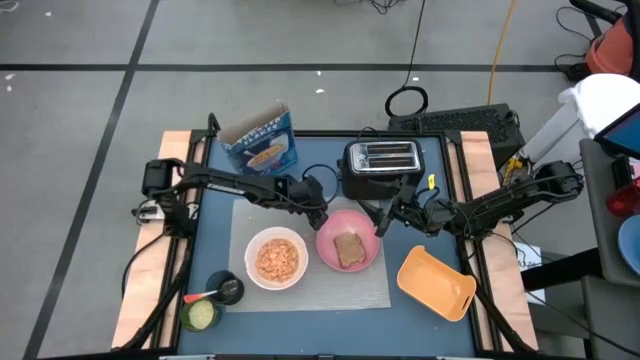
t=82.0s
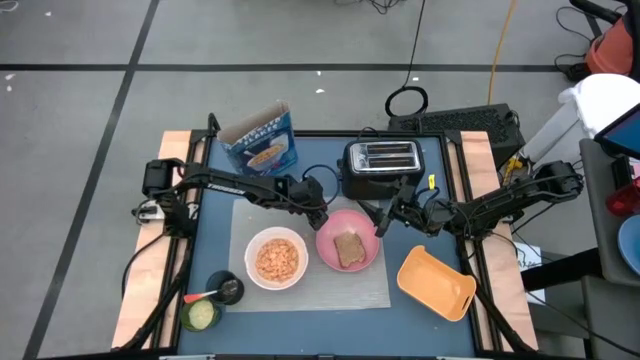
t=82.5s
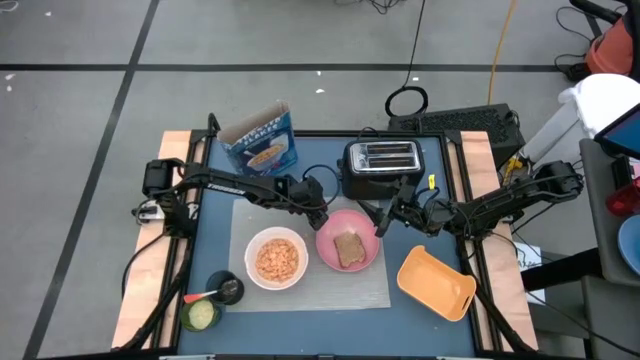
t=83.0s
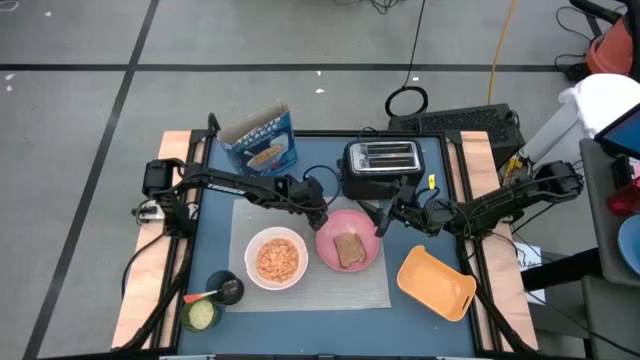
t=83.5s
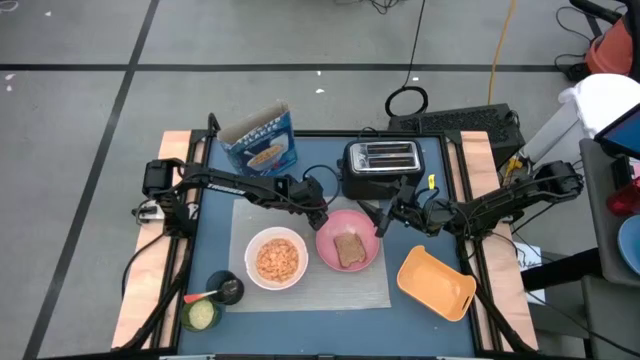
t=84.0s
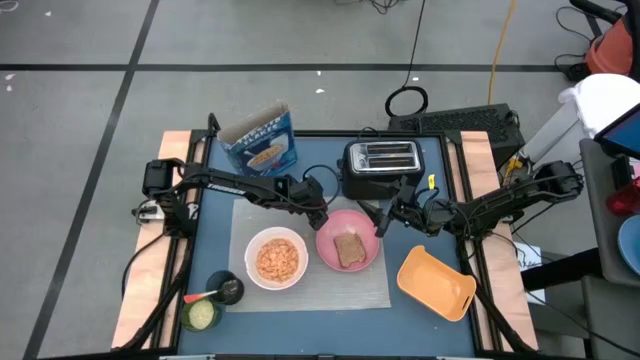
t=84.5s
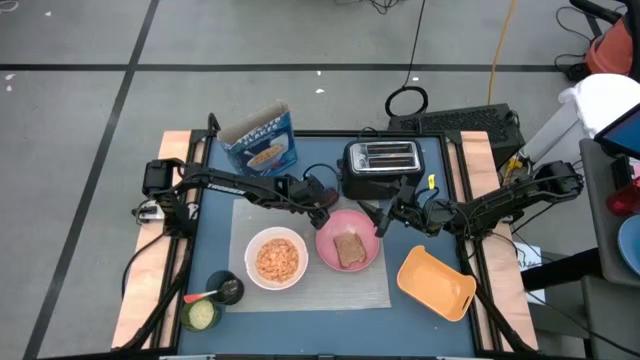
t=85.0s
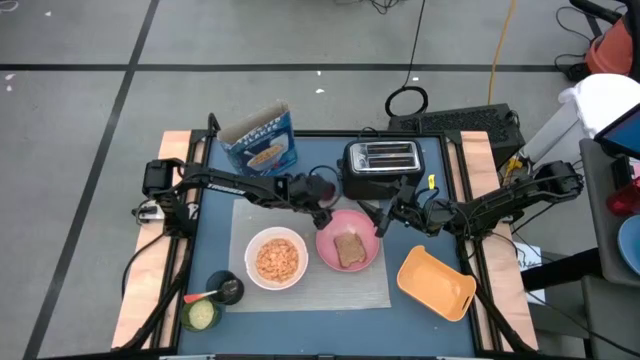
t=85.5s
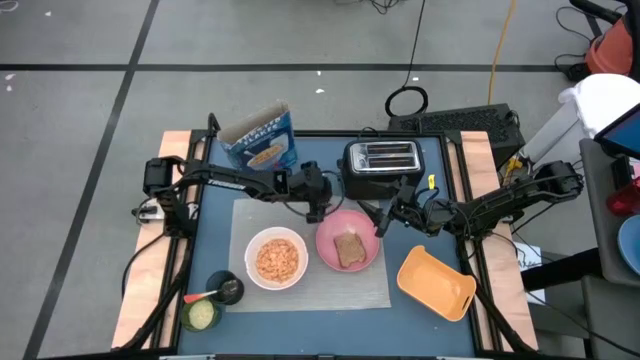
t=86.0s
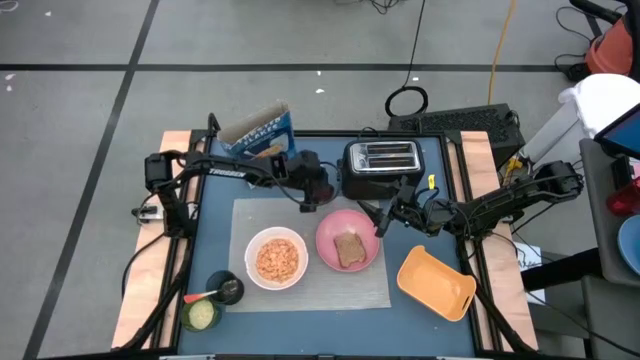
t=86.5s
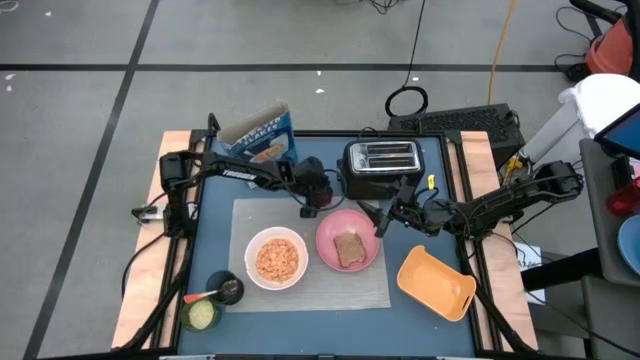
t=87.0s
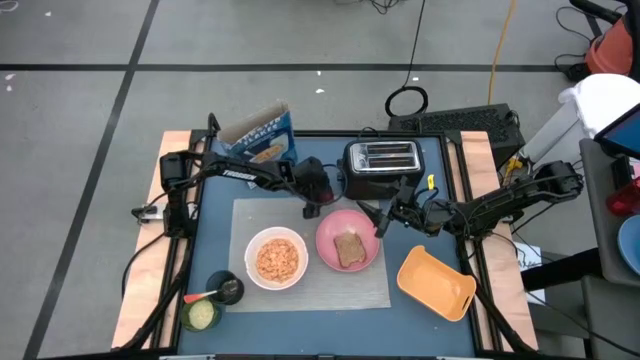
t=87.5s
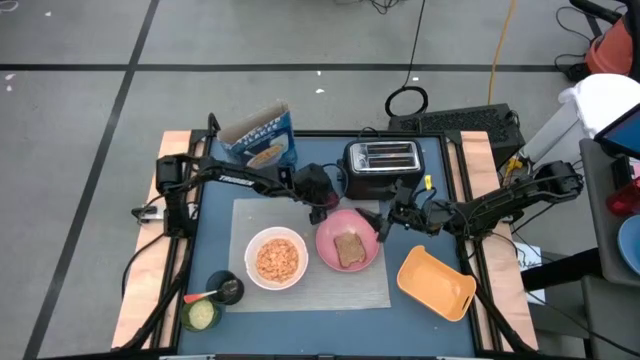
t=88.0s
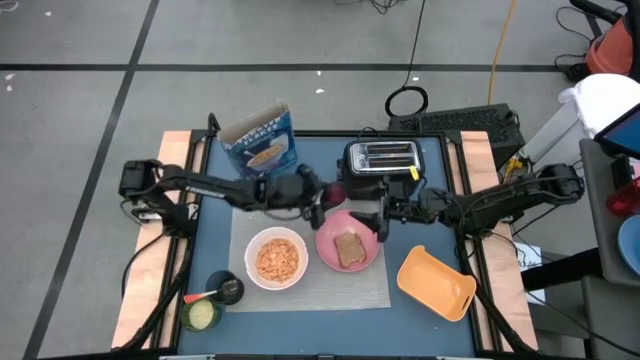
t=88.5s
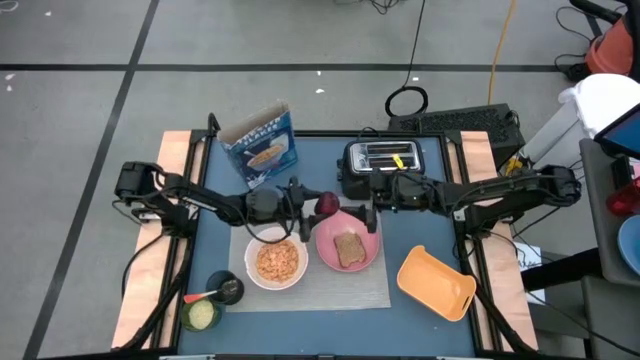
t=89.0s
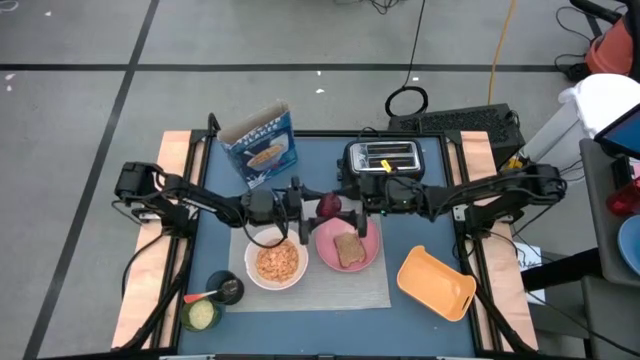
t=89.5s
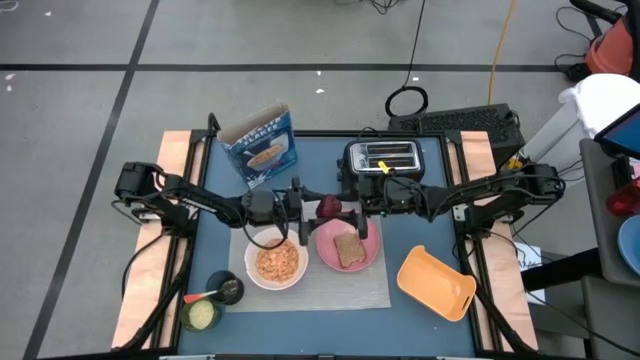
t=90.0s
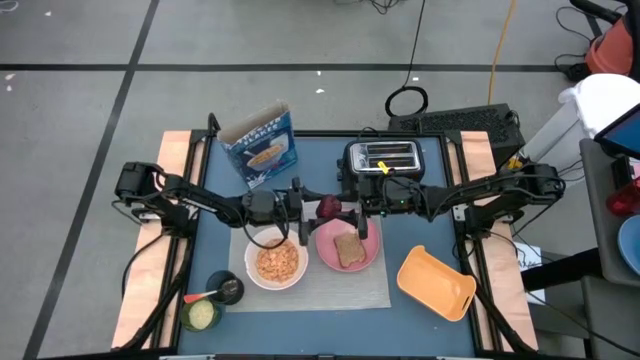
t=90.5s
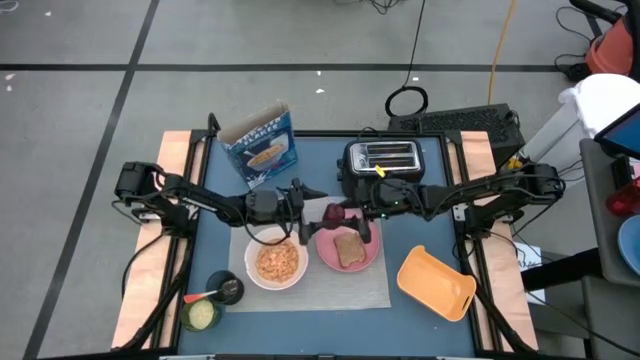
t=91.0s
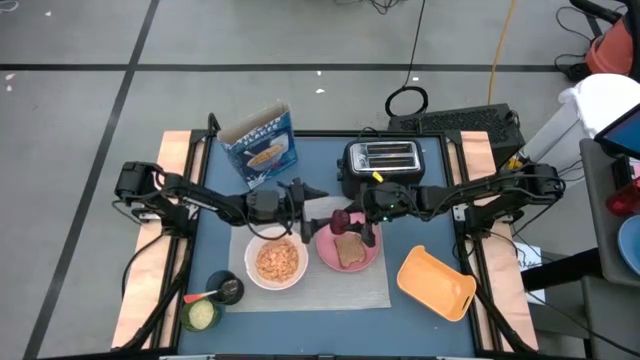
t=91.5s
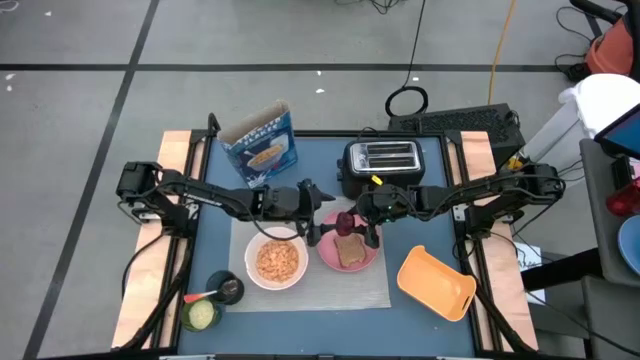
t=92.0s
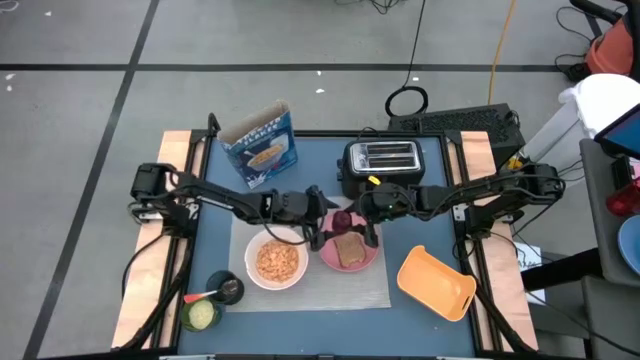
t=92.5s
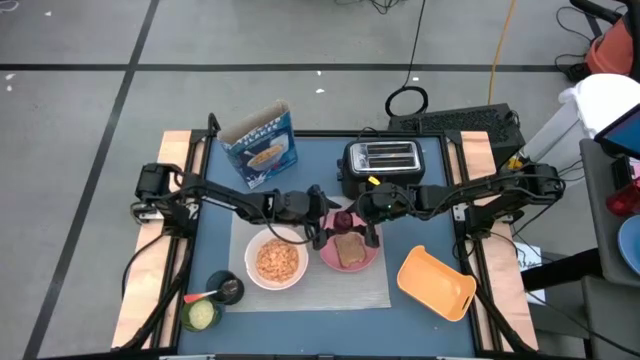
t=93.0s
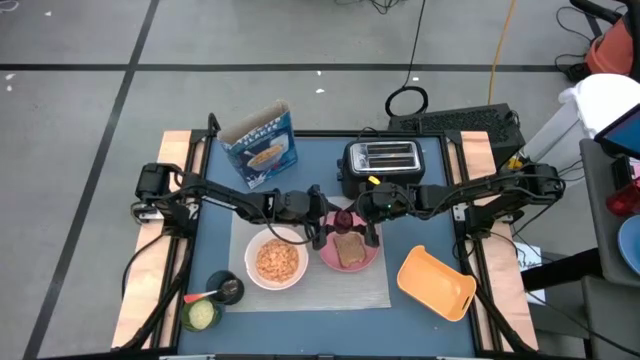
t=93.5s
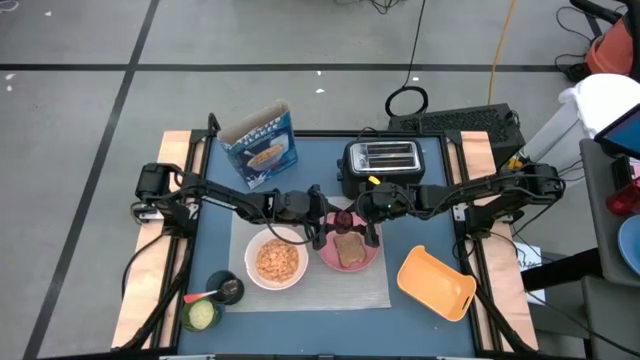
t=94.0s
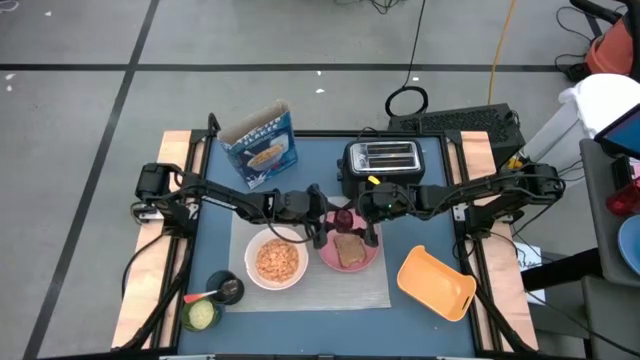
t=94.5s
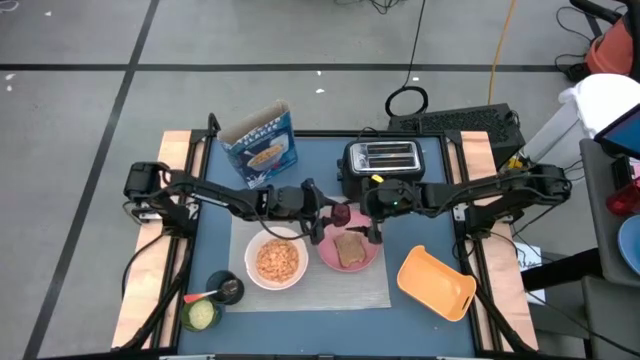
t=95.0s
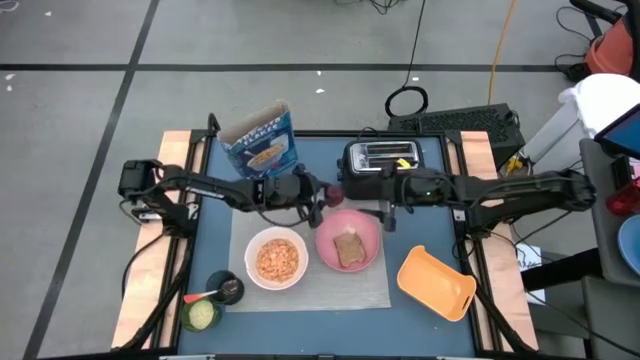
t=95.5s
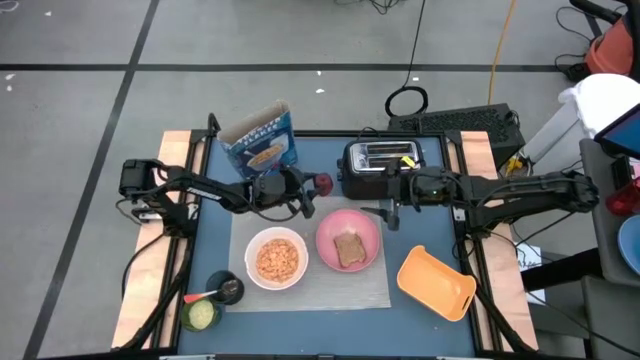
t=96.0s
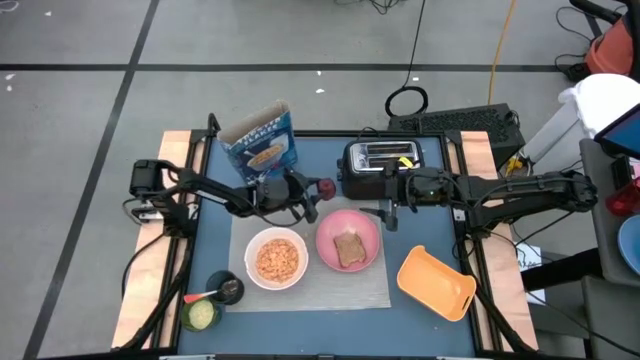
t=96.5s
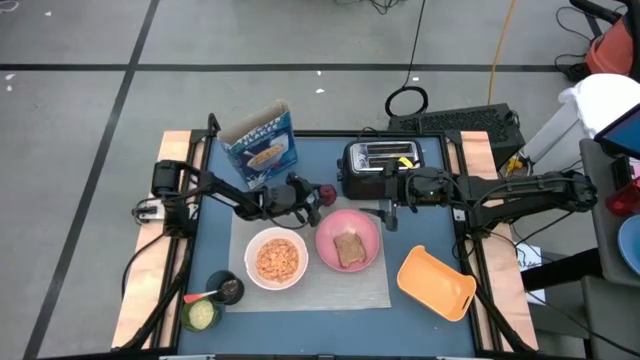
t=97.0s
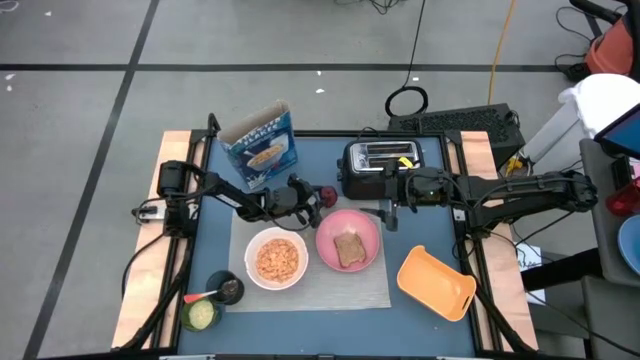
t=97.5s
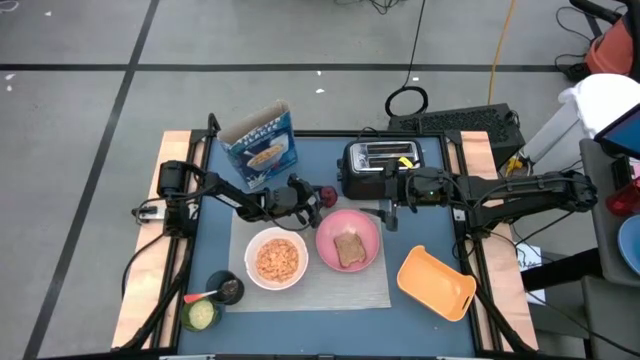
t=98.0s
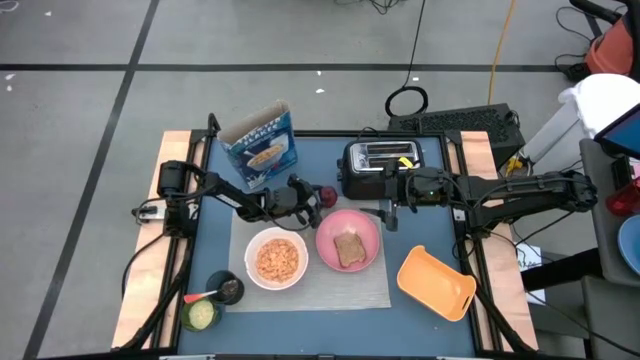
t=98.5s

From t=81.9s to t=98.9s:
Task: Arrange a breakfast setting
Put the apple on the mat

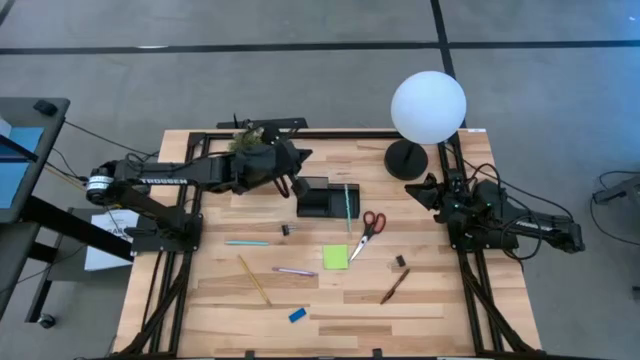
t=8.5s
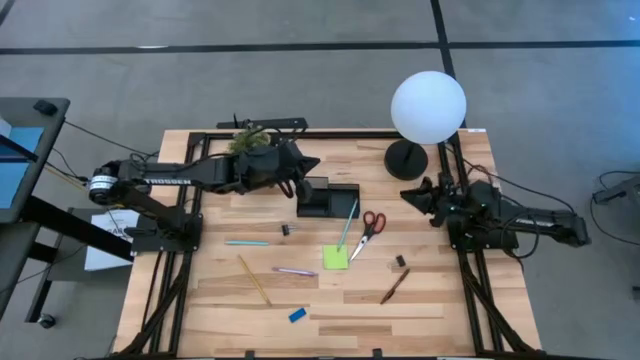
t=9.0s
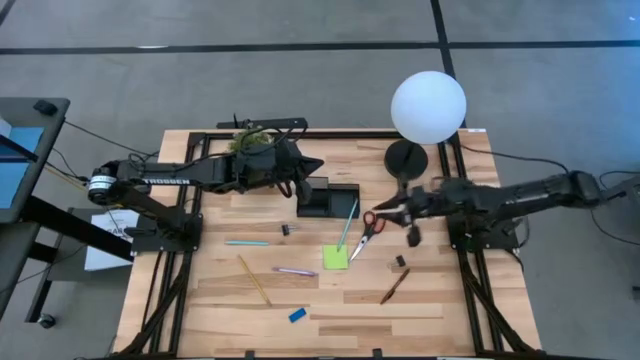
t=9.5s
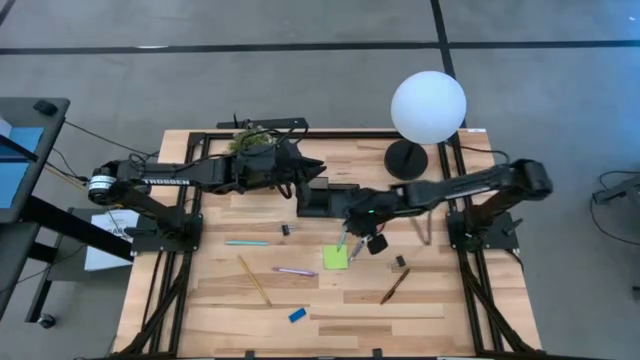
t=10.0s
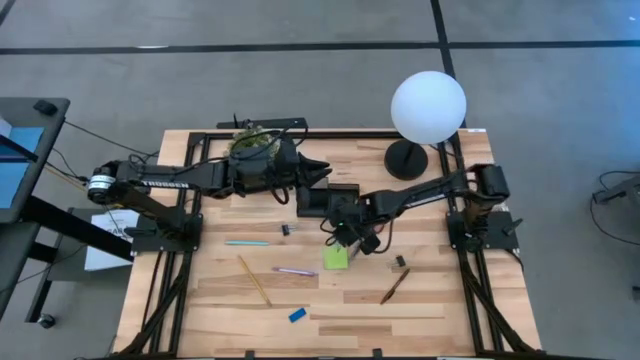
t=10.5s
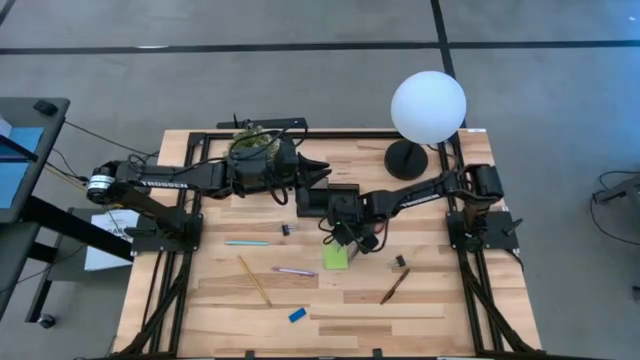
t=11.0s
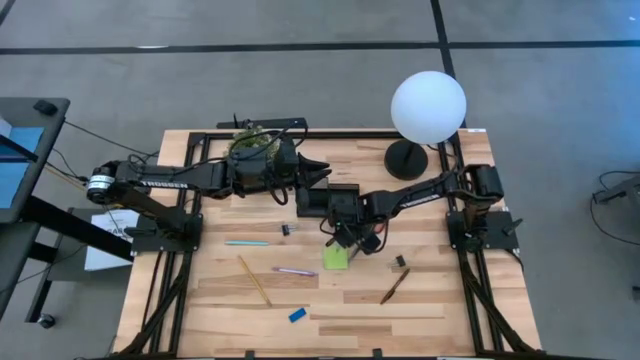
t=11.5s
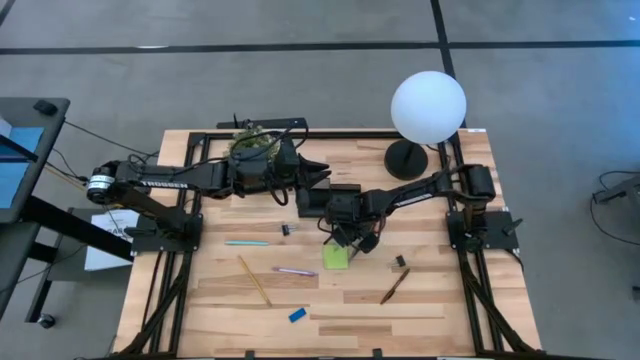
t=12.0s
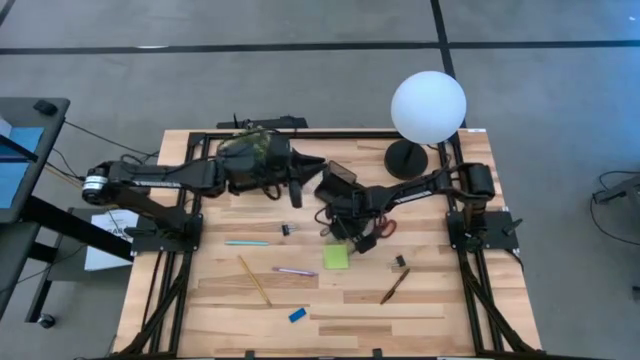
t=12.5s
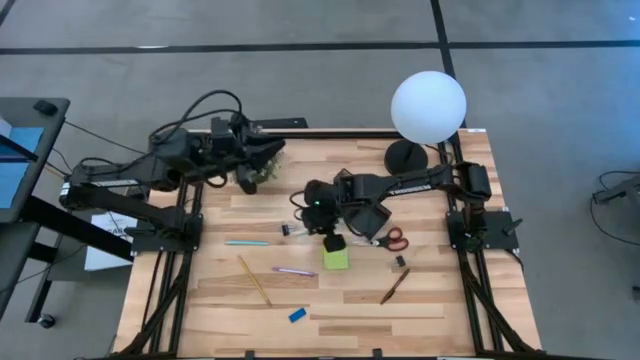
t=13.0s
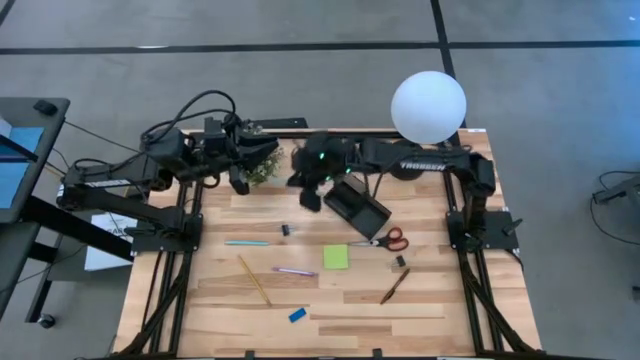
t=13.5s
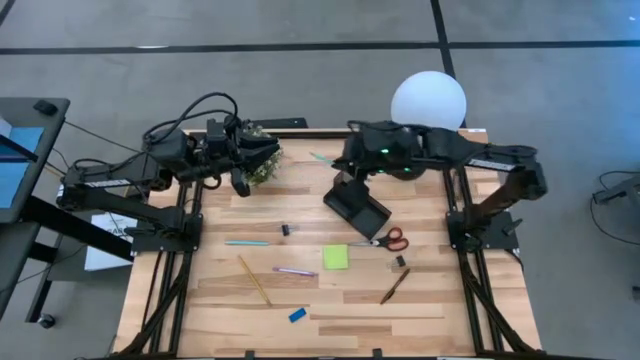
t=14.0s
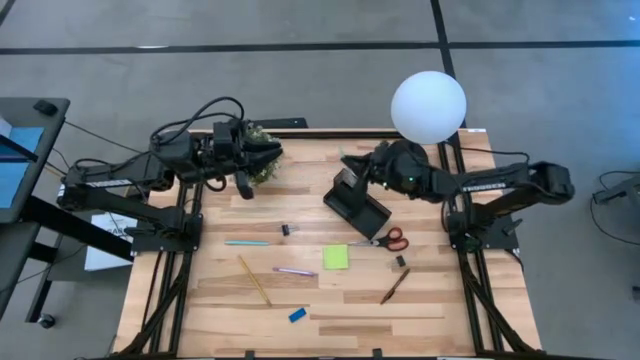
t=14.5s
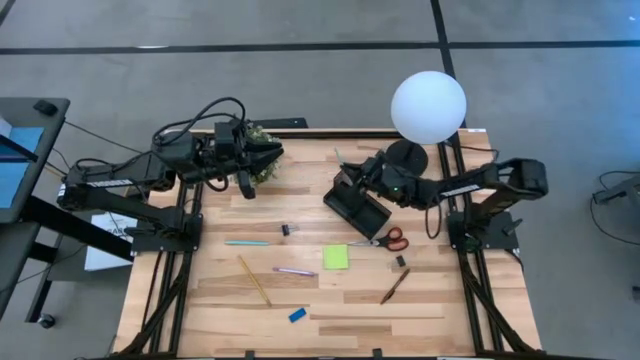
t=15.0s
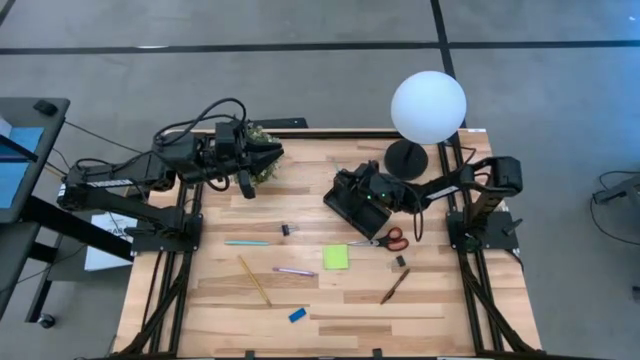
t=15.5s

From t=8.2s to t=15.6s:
Task: Pick and place office supplies into organizer
Put the blue pencil into the black desk organizer
